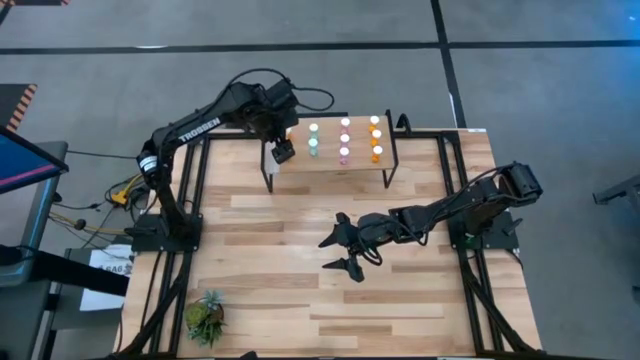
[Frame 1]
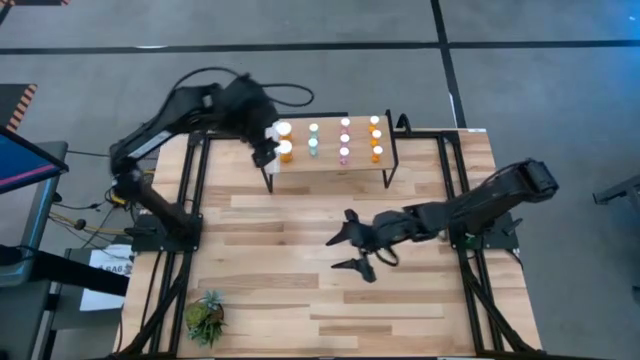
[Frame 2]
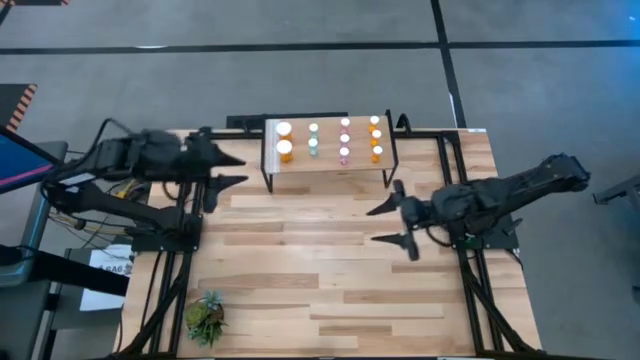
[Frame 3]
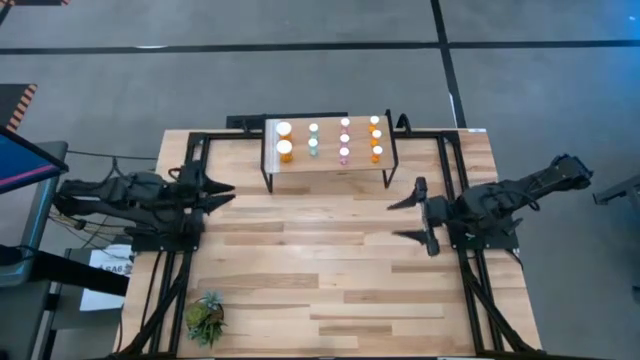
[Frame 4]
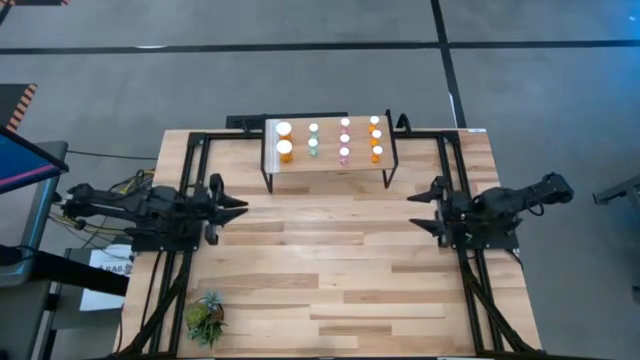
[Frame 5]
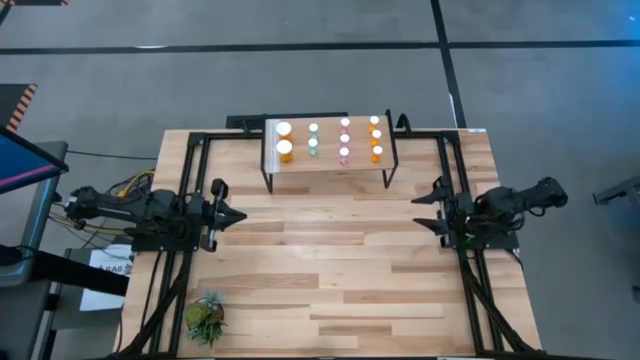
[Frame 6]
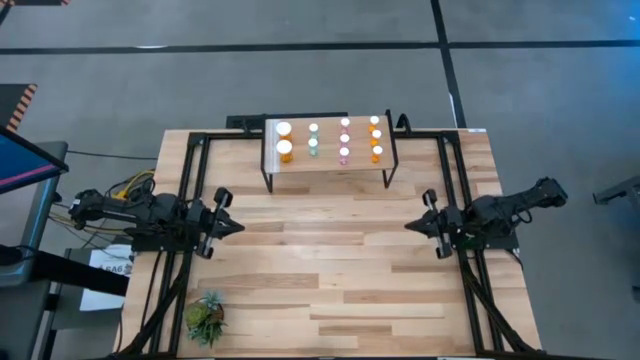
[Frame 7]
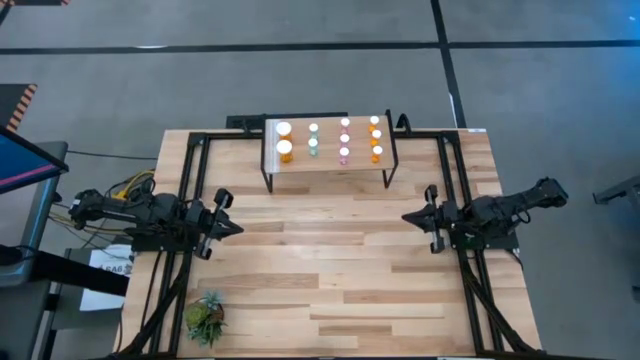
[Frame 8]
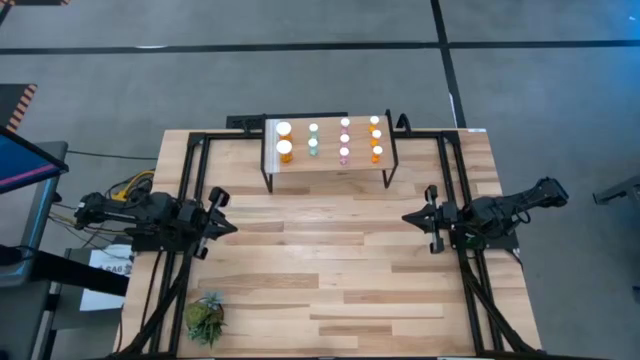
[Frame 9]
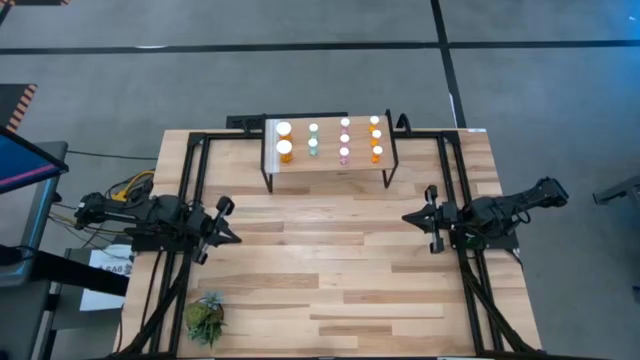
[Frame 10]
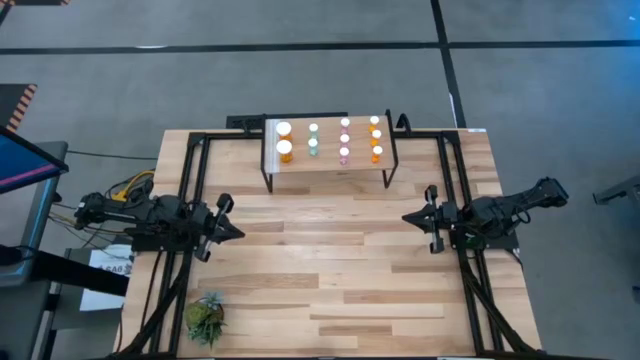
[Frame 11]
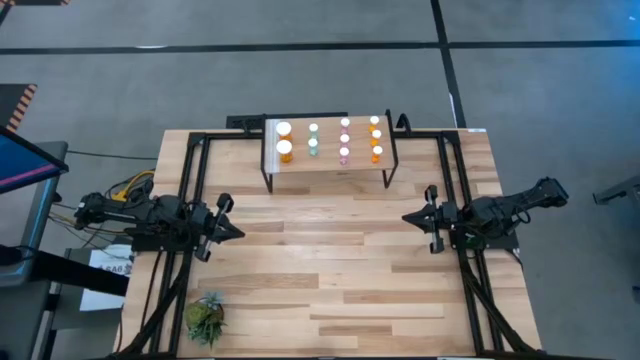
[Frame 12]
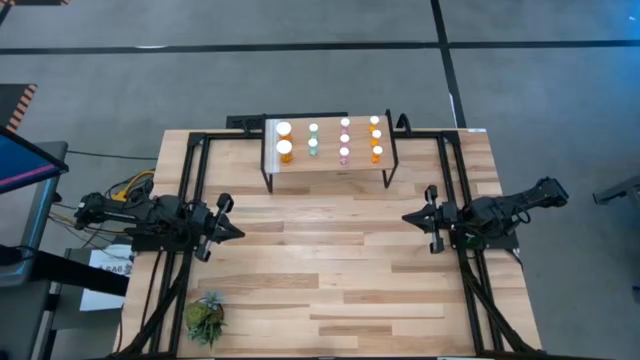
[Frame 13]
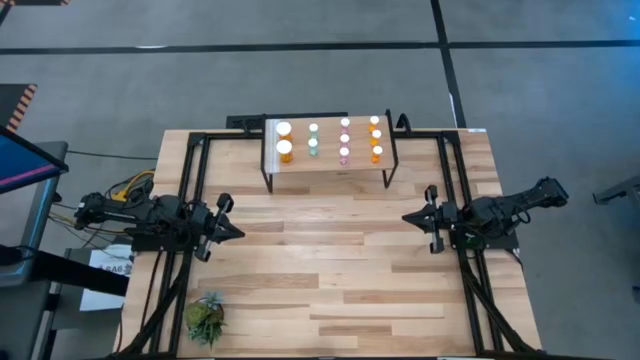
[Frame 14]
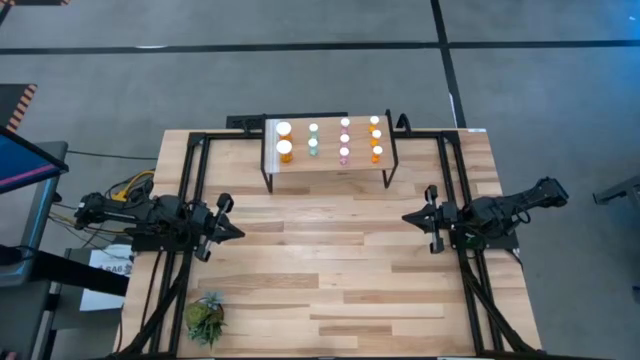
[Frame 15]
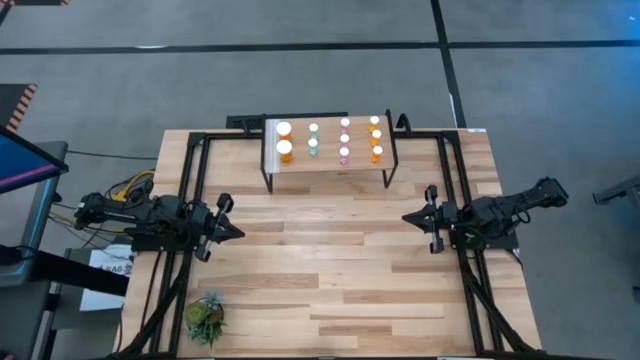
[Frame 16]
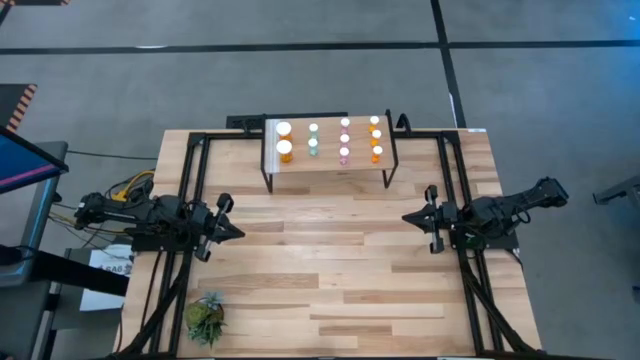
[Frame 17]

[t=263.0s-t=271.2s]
Task: Pick and place medicine bottles onto shelf by color
Return to Home Position

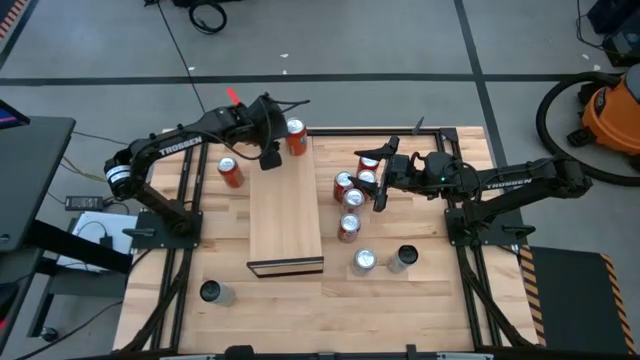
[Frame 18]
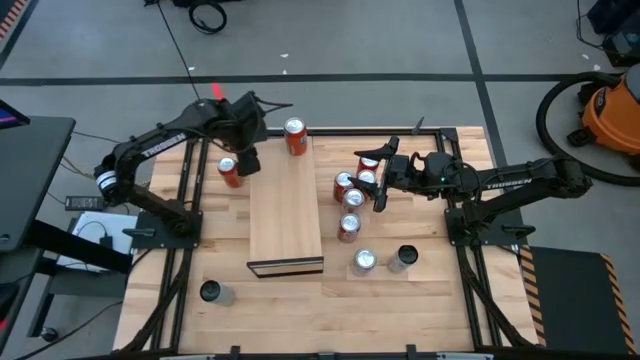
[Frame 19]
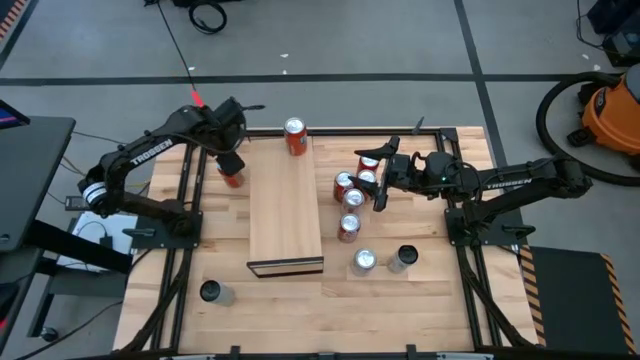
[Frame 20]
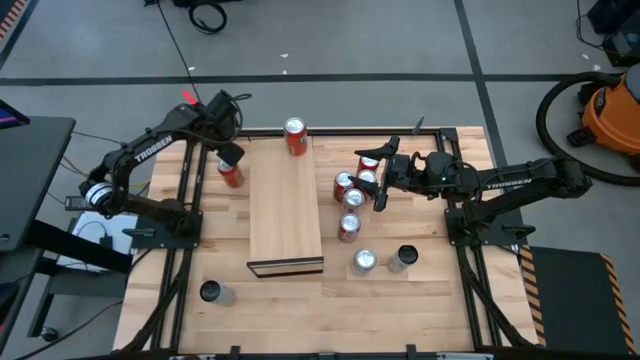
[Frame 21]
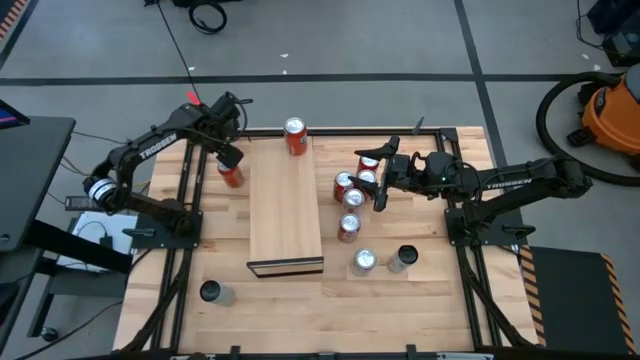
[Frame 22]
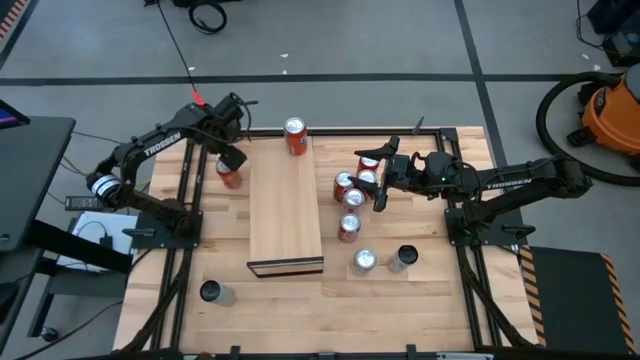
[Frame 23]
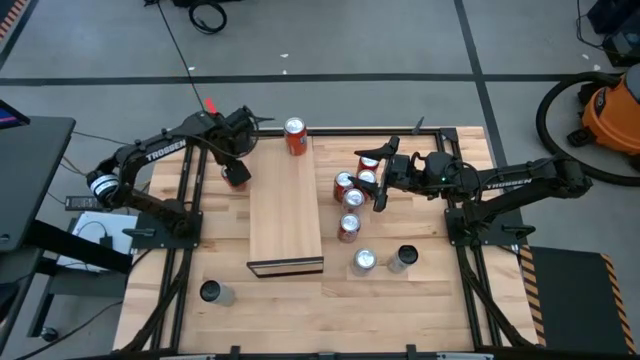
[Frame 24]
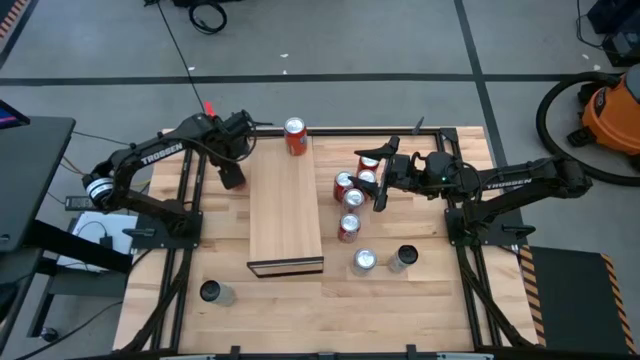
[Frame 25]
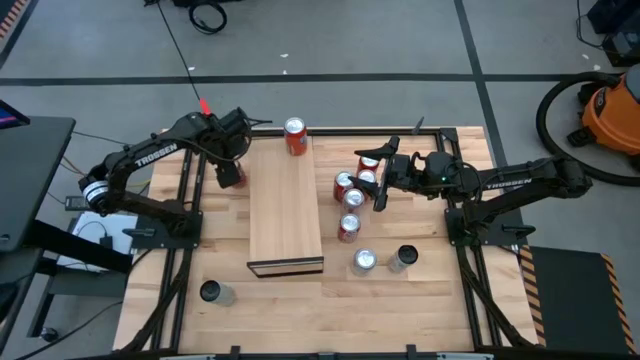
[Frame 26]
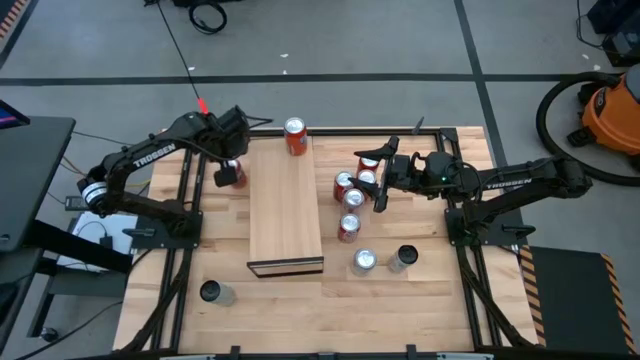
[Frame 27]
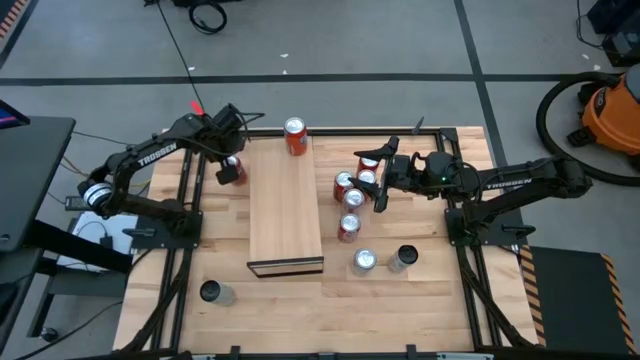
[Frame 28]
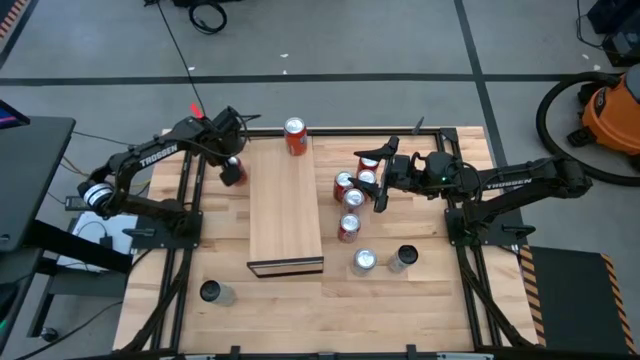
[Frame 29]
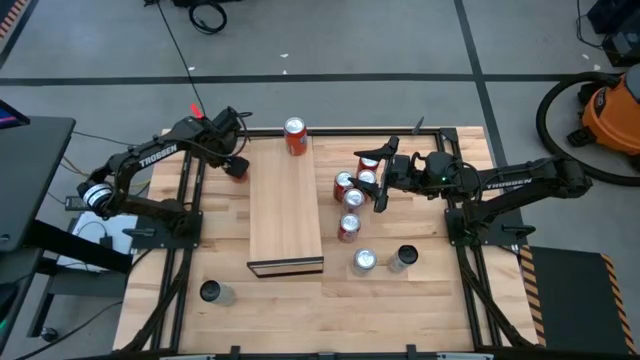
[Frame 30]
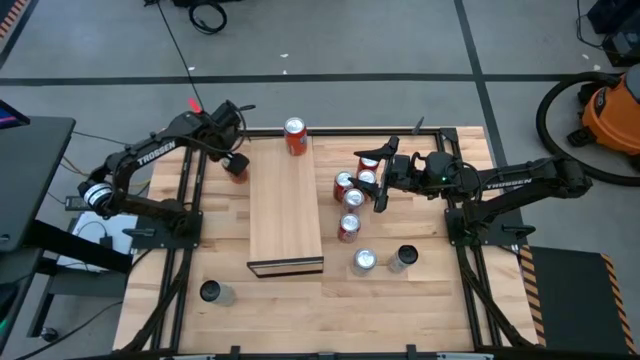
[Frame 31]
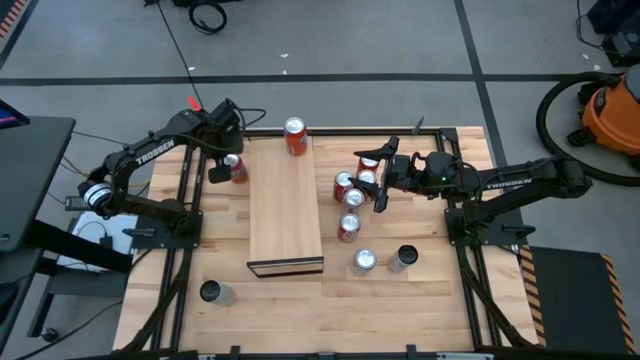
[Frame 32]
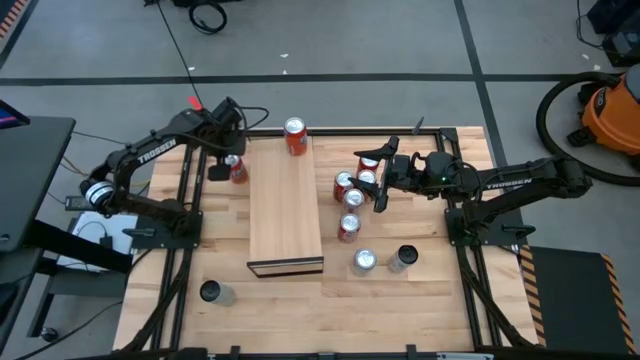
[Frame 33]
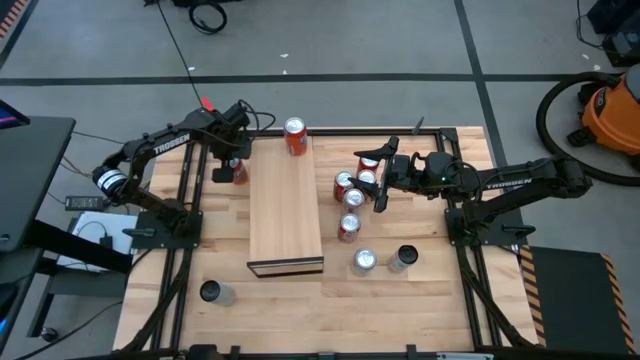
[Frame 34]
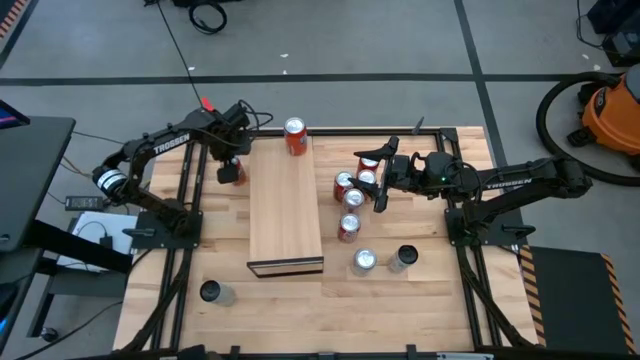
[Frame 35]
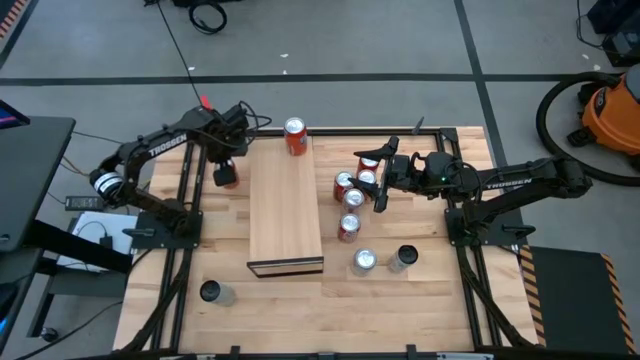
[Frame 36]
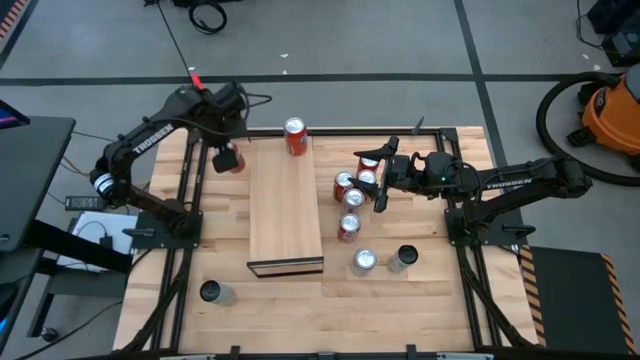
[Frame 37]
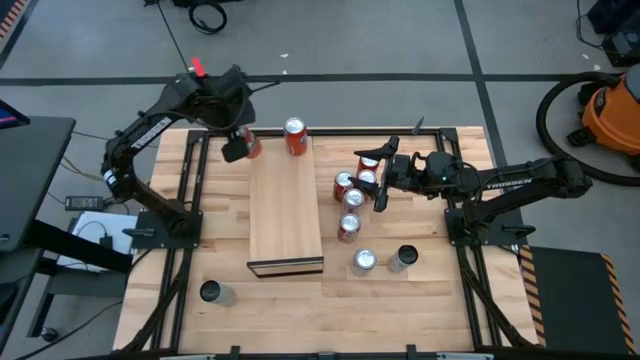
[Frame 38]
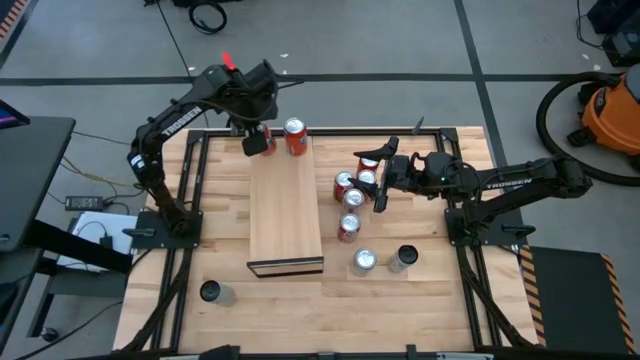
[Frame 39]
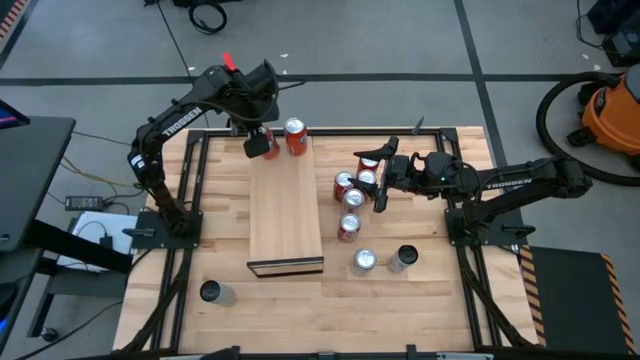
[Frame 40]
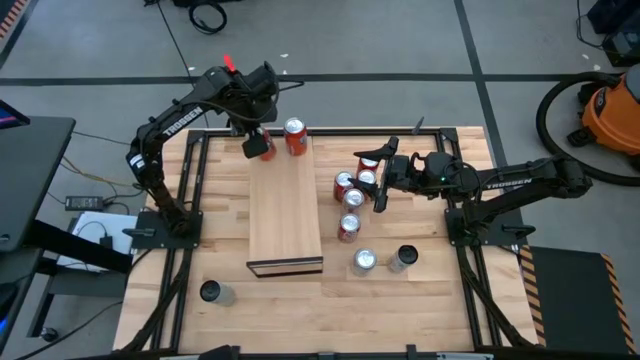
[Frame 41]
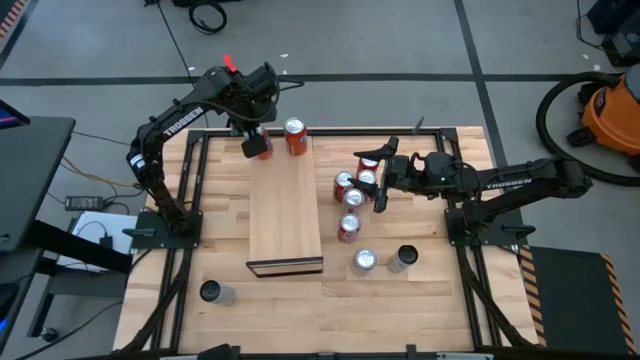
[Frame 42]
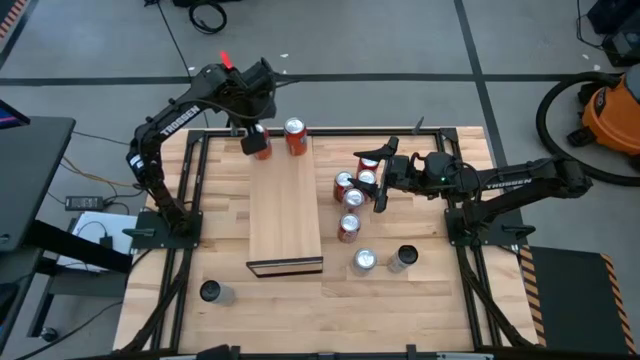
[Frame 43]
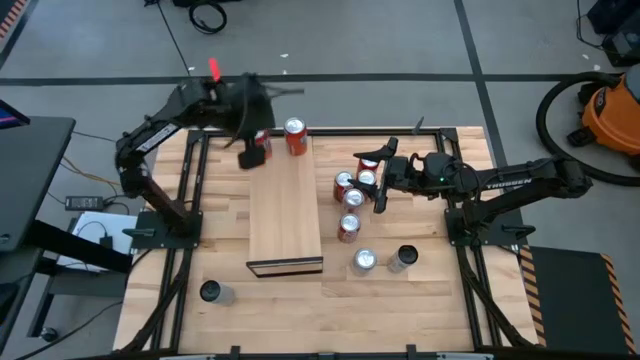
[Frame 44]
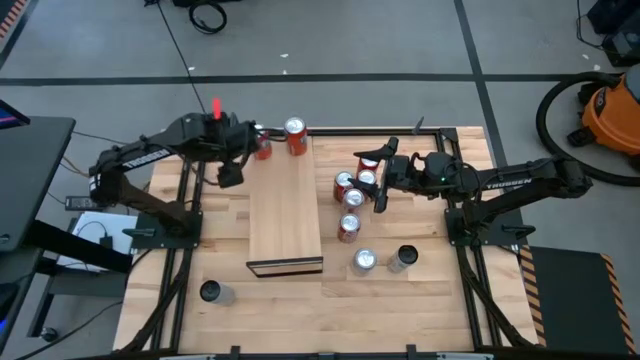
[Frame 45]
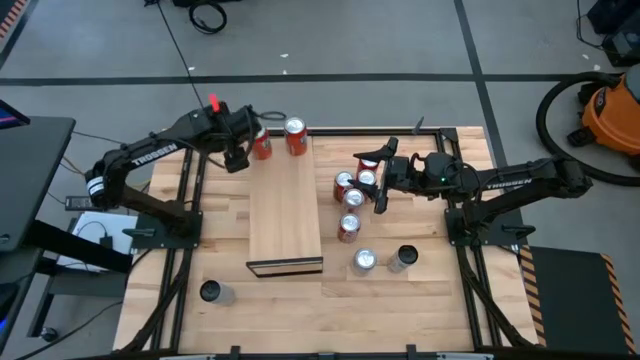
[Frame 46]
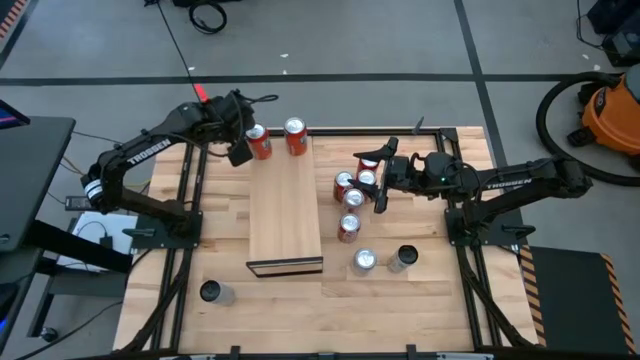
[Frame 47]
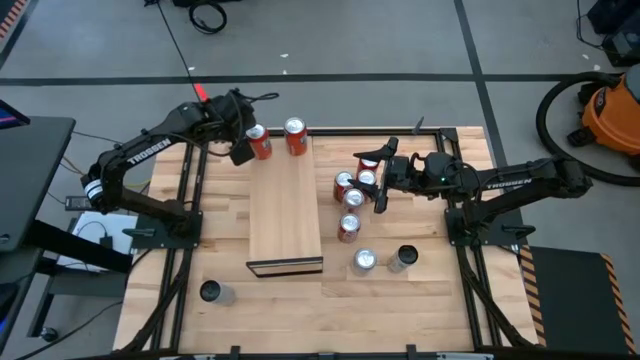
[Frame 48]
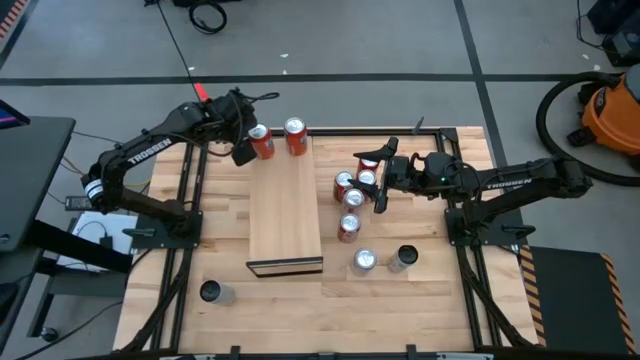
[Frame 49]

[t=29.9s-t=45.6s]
Task: Place canned beverage on shelf
Put the orange soda can on the shelf and align it with the other orange soda can
